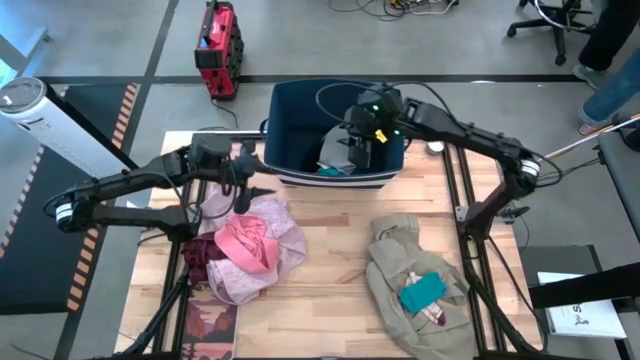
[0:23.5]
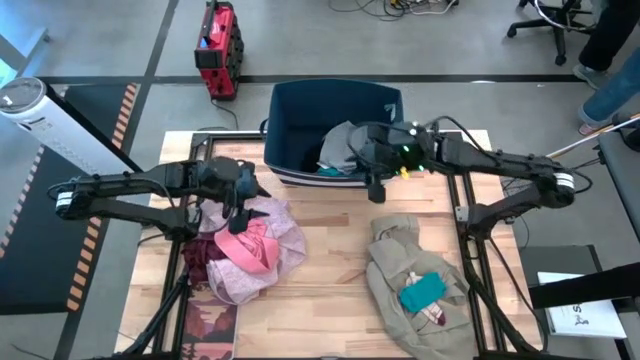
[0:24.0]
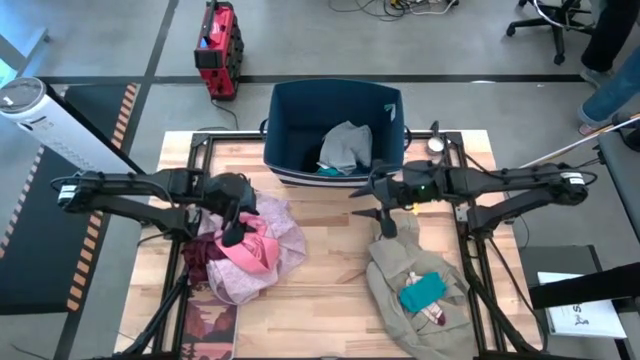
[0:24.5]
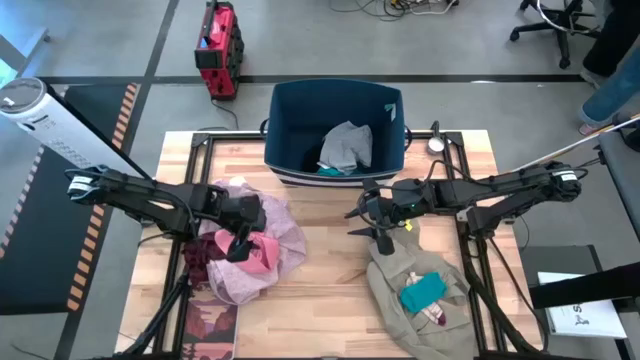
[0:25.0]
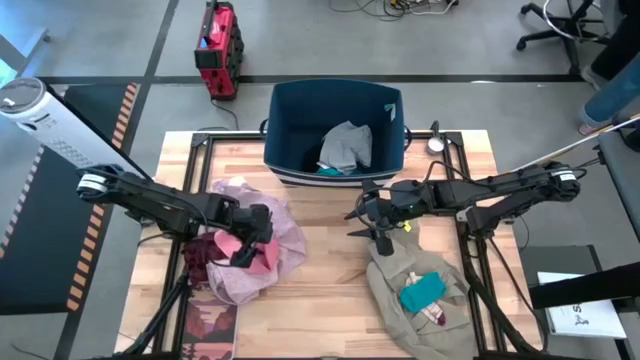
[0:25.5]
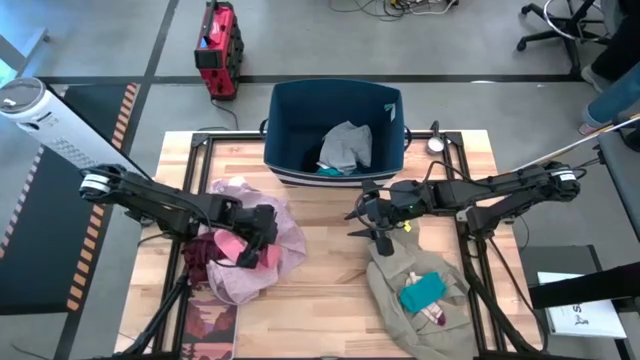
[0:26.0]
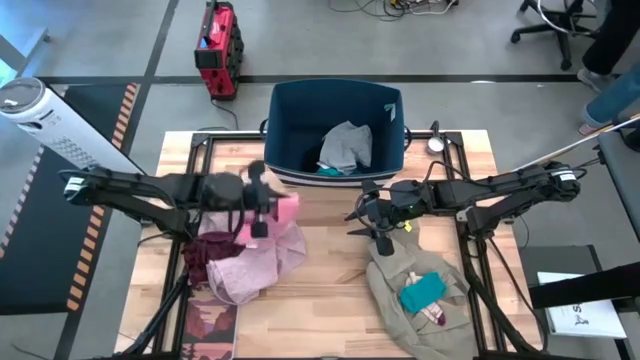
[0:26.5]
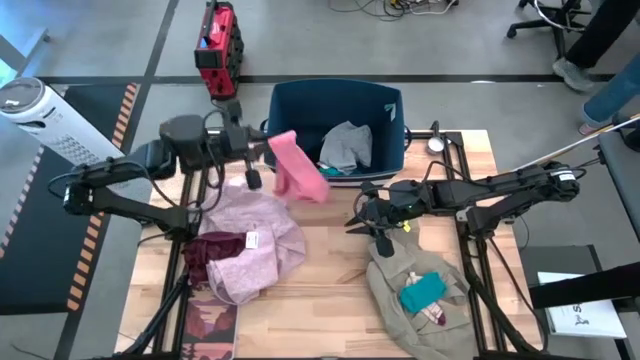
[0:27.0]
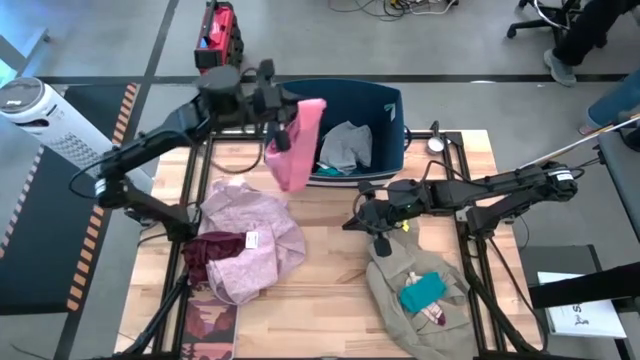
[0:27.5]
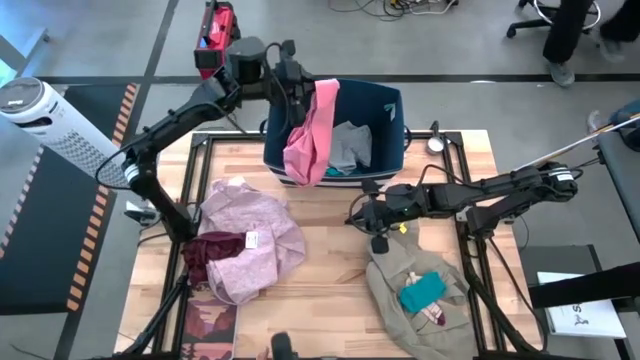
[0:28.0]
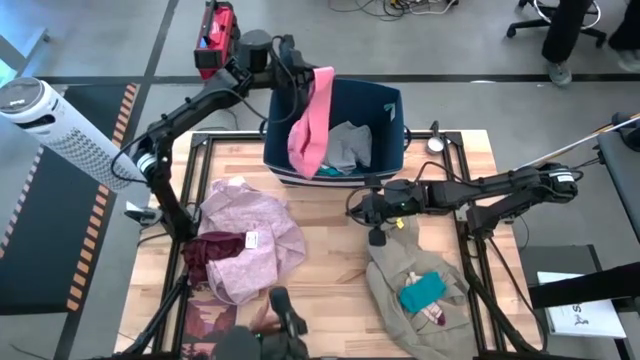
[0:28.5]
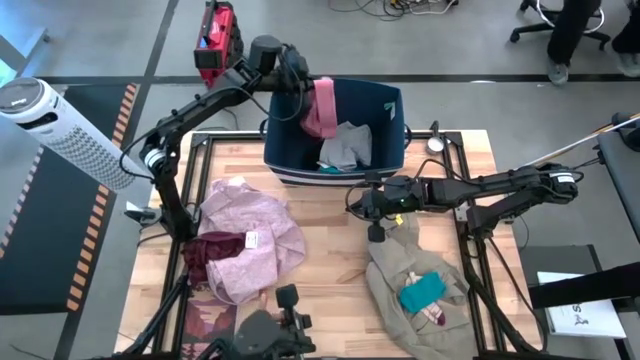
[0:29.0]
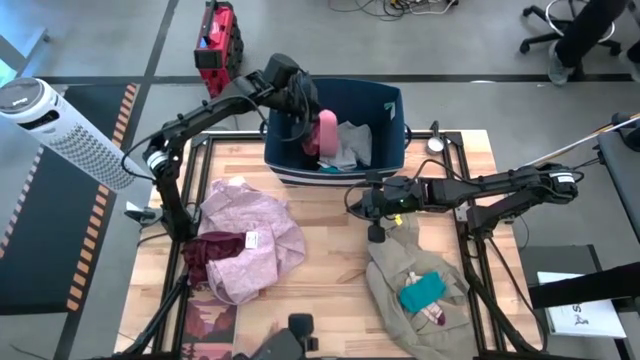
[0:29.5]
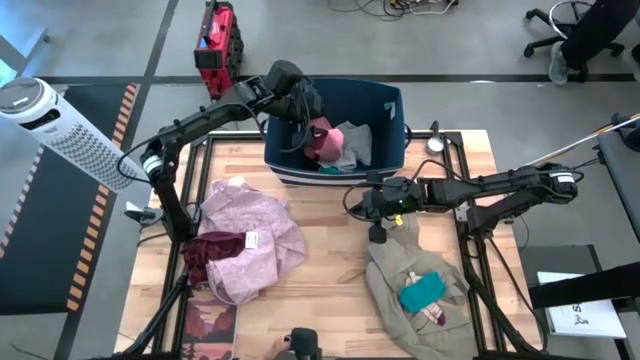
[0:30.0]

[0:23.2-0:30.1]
Task: Sort clothes
Put the pink underwear into the blue laundry organizer

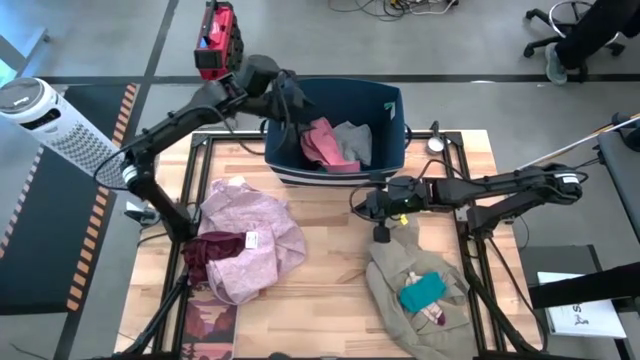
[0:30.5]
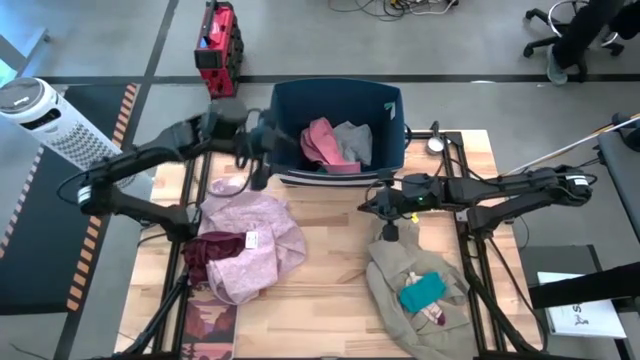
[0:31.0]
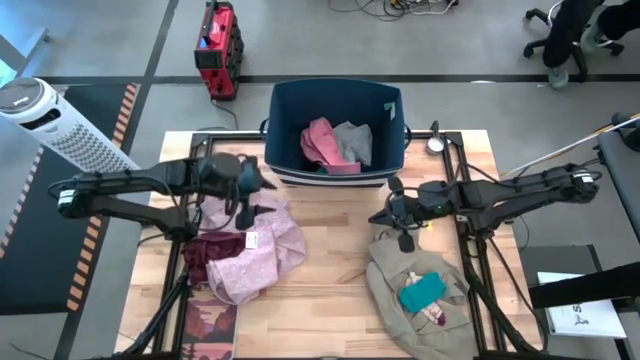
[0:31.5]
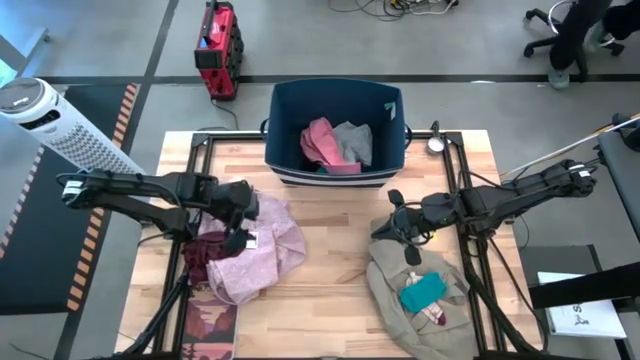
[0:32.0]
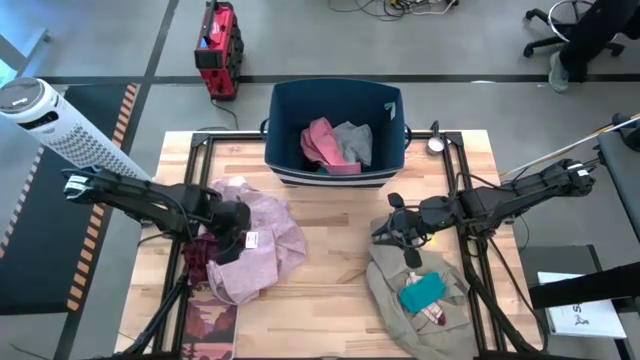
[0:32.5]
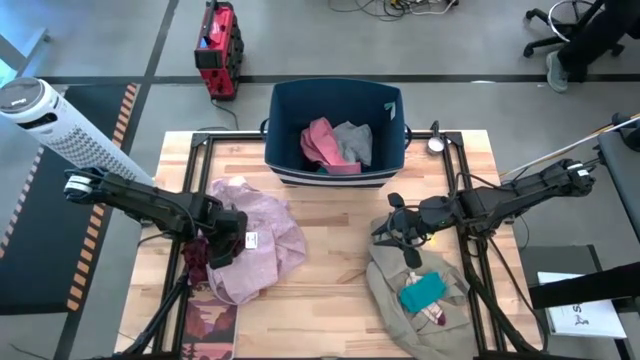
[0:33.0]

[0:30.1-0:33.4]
Put the red underwear into the blue laundry organizer

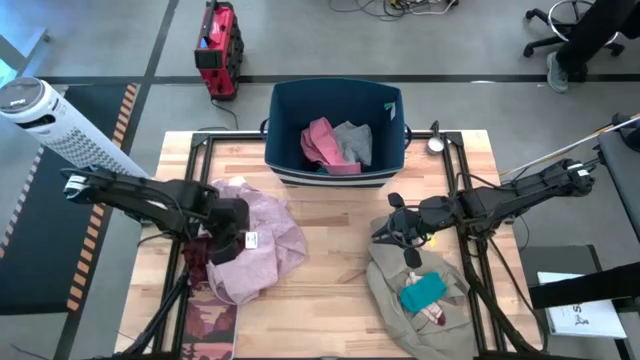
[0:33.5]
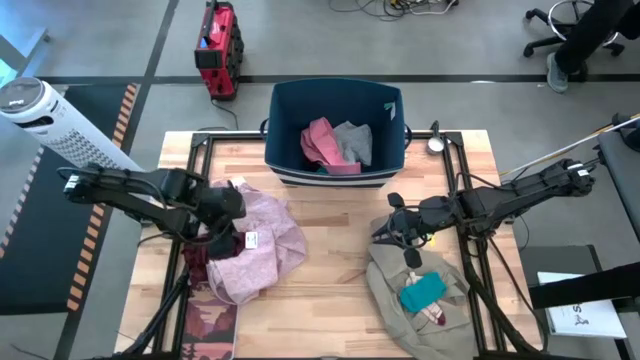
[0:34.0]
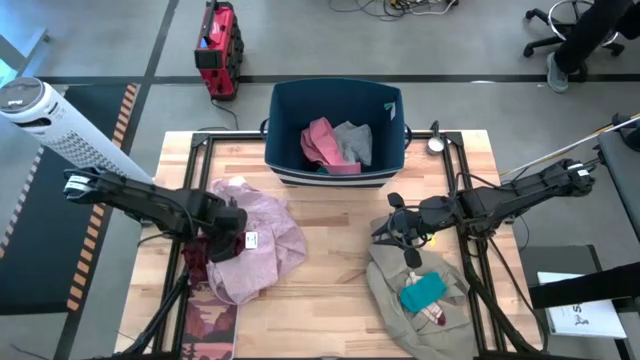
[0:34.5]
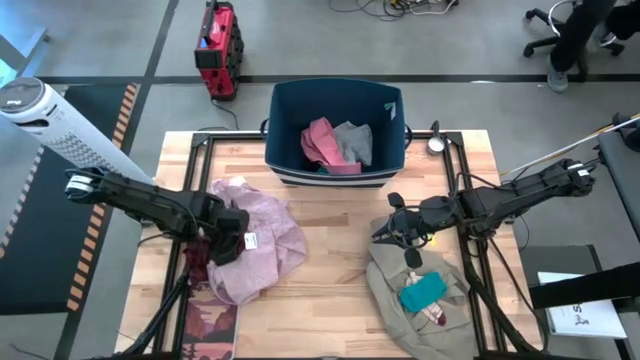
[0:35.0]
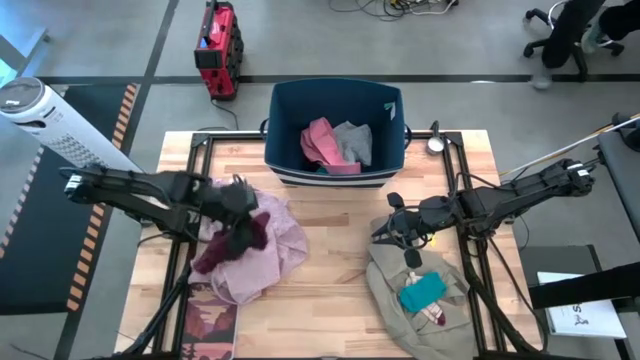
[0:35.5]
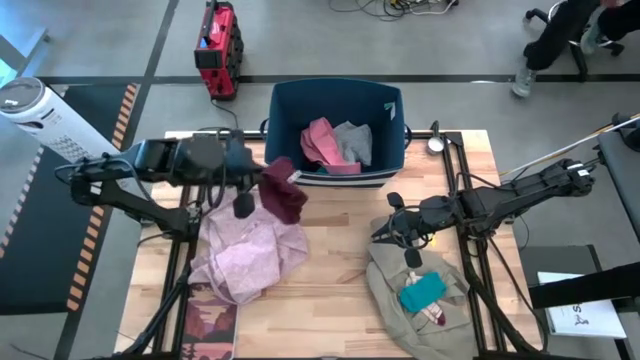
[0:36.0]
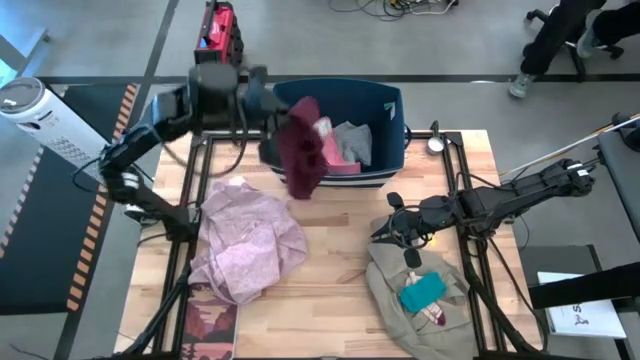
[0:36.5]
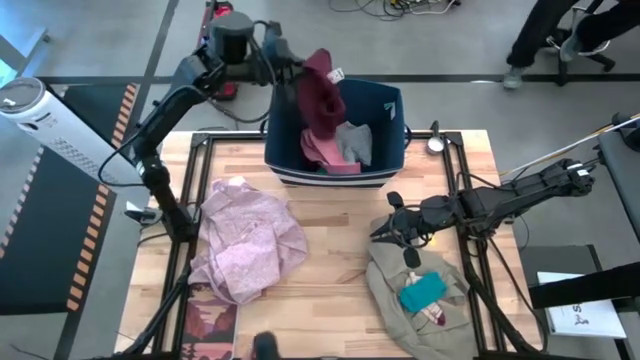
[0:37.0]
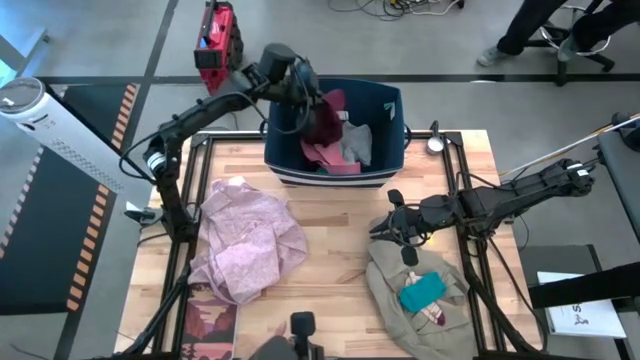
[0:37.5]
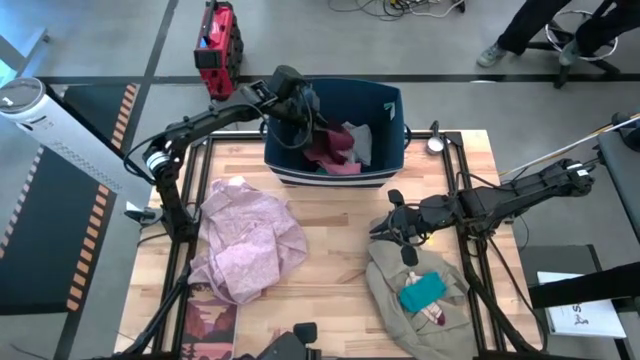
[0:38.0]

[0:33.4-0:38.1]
Put the red underwear into the blue laundry organizer

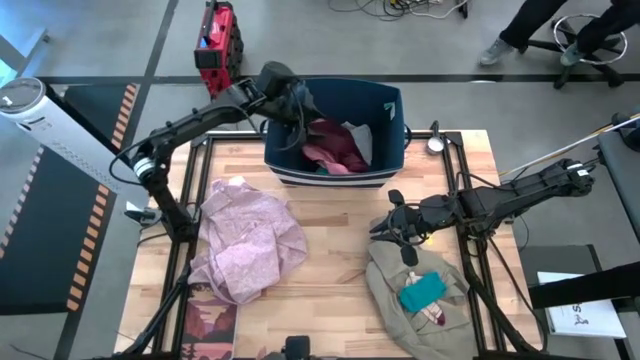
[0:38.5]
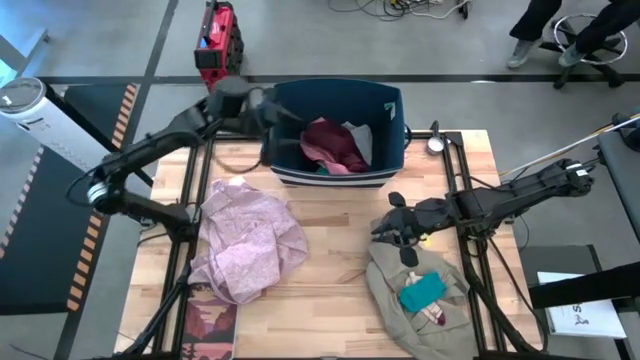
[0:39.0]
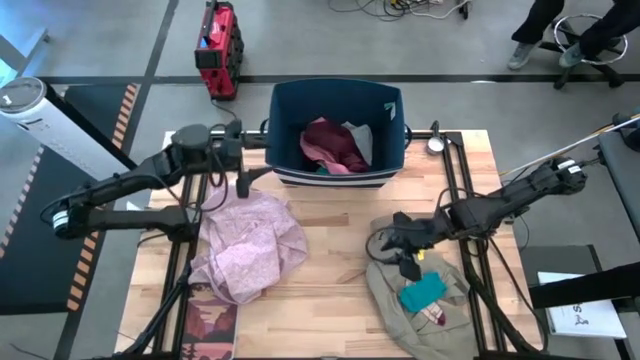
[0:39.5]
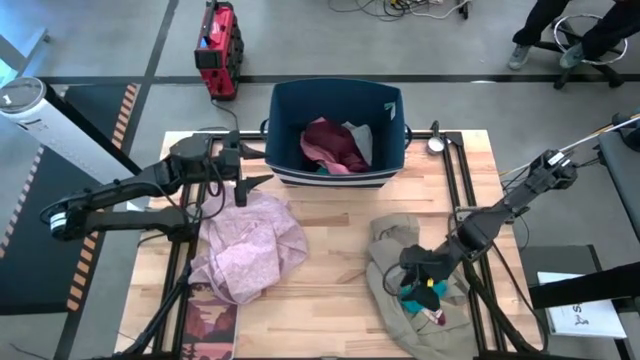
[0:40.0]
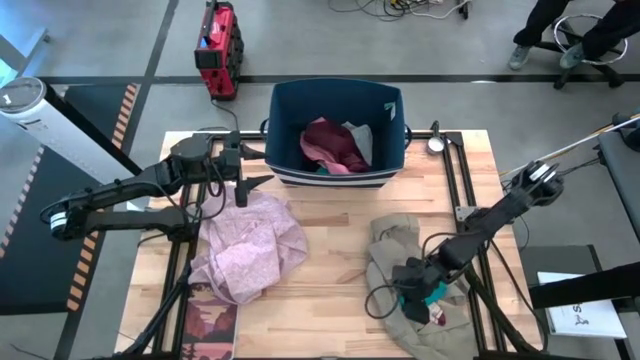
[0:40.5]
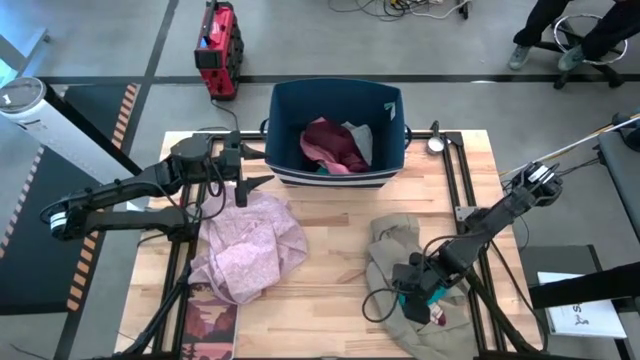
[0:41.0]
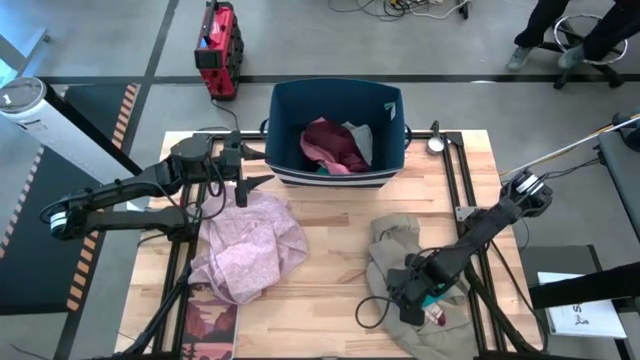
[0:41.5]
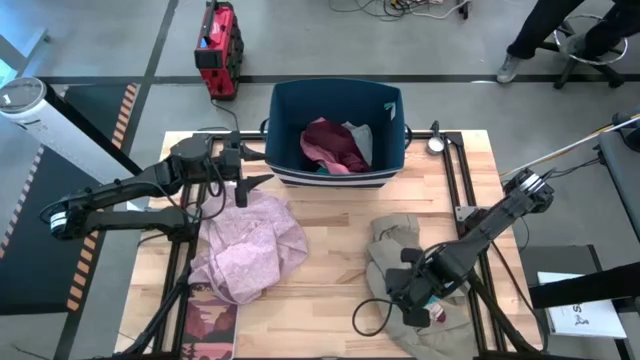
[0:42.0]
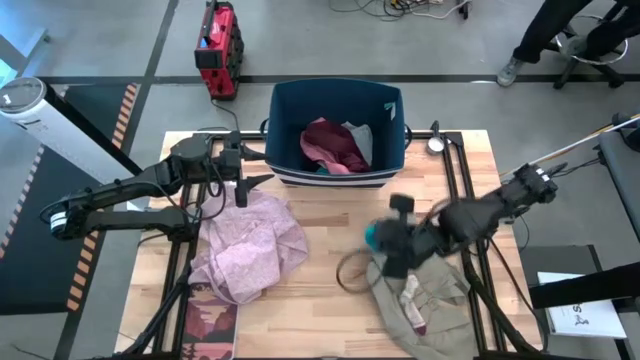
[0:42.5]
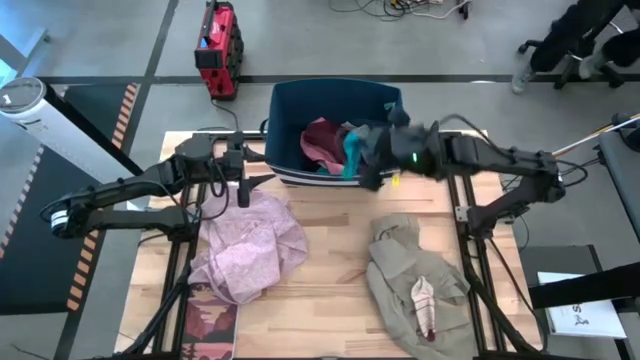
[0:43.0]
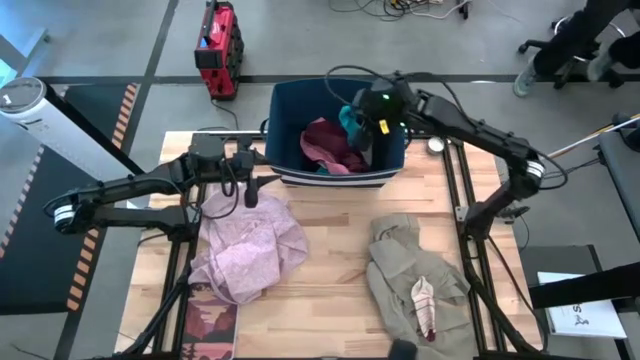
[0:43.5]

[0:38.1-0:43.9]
Put the blue sock into the blue laundry organizer
